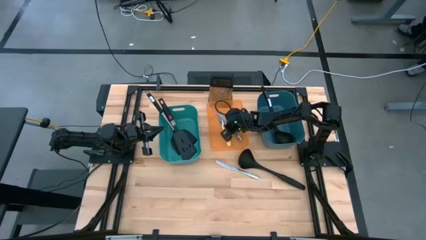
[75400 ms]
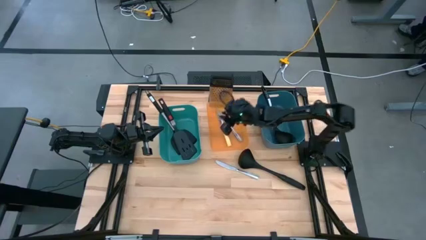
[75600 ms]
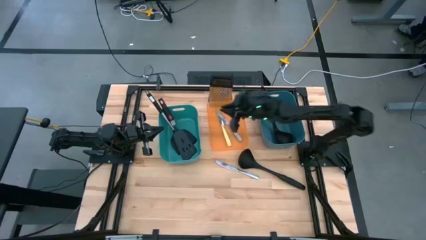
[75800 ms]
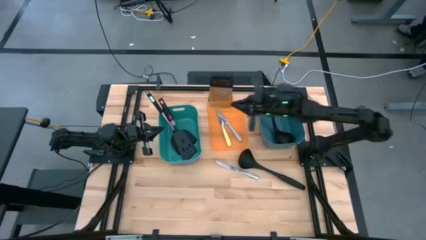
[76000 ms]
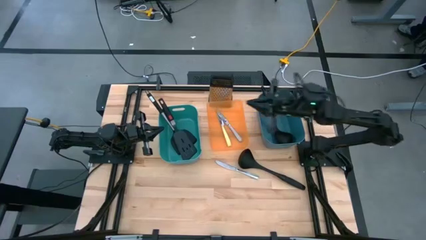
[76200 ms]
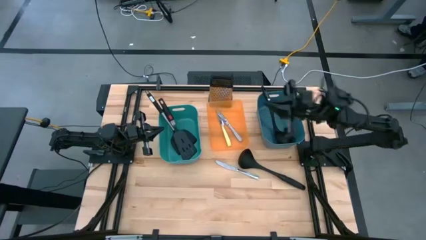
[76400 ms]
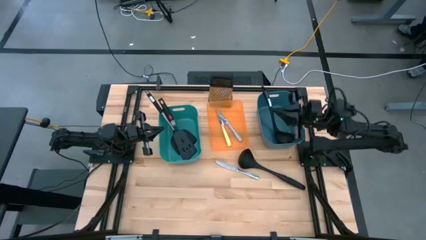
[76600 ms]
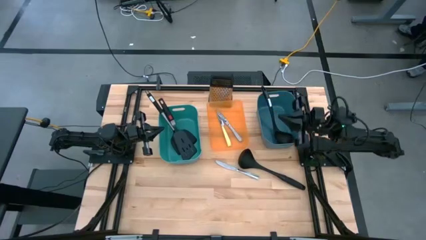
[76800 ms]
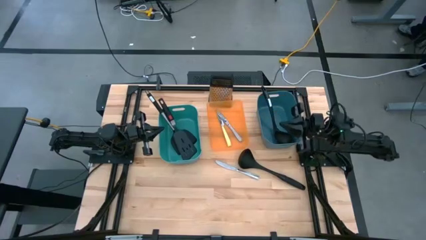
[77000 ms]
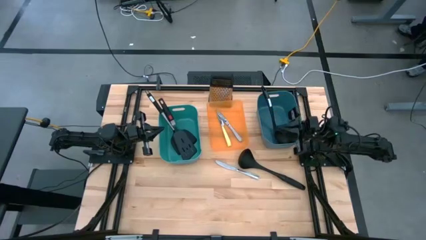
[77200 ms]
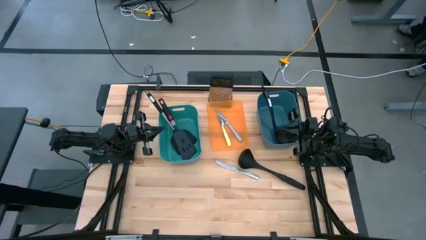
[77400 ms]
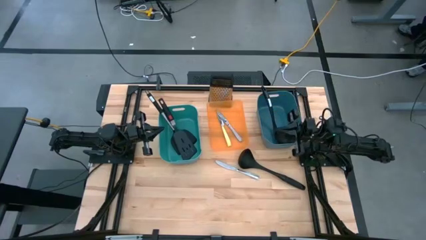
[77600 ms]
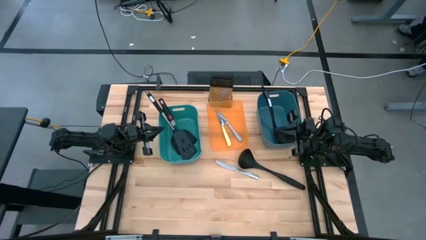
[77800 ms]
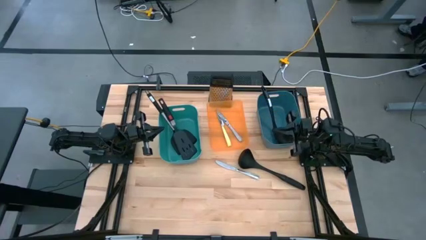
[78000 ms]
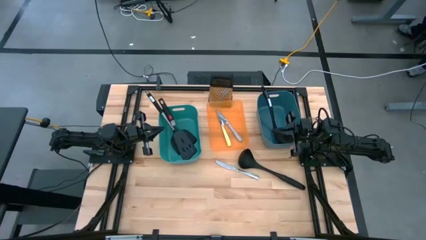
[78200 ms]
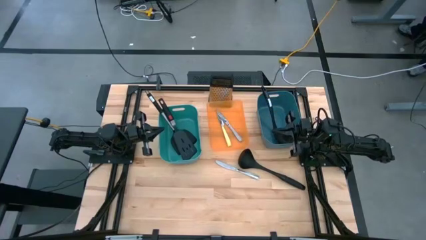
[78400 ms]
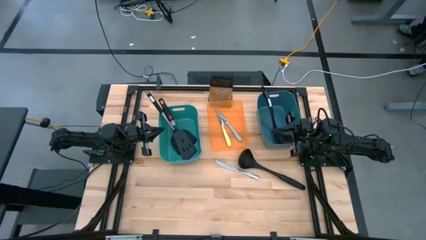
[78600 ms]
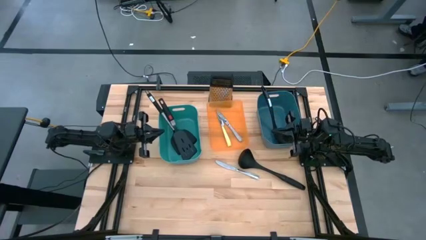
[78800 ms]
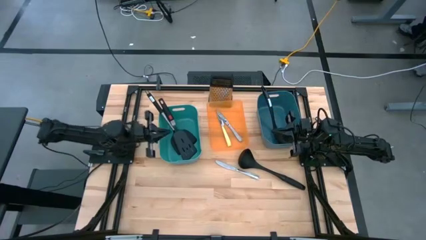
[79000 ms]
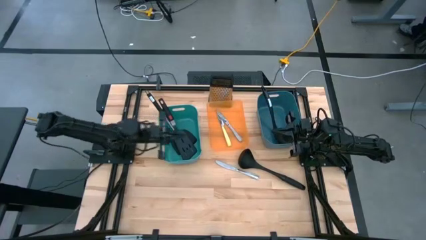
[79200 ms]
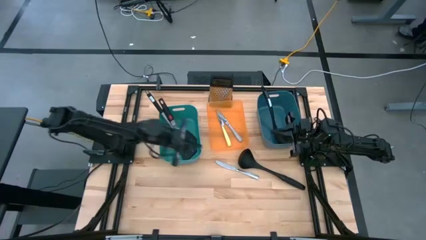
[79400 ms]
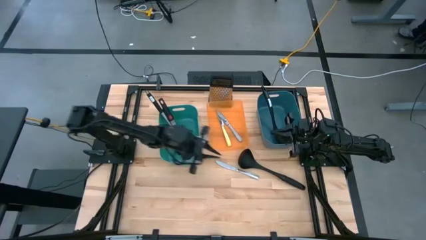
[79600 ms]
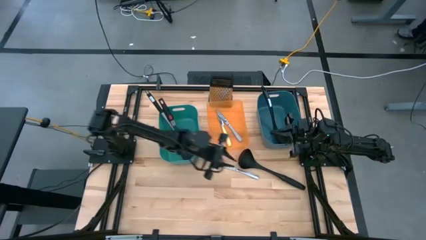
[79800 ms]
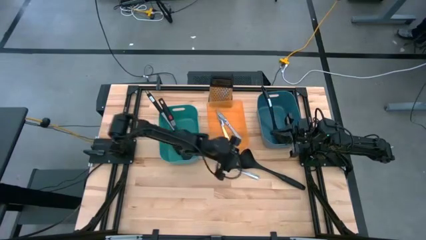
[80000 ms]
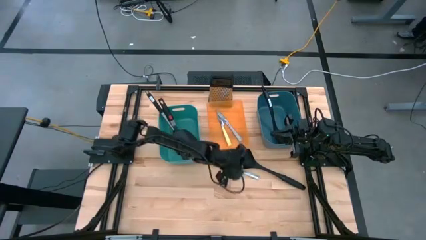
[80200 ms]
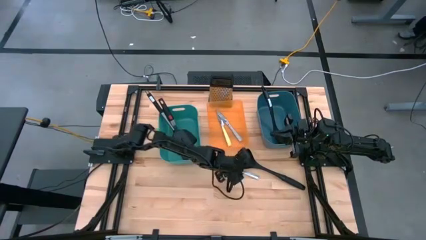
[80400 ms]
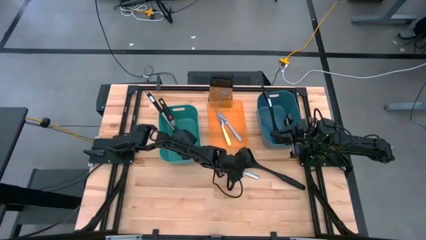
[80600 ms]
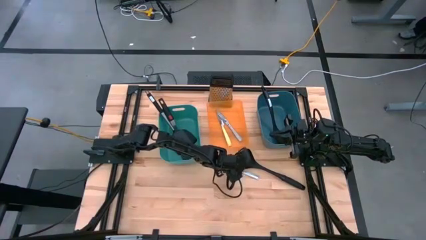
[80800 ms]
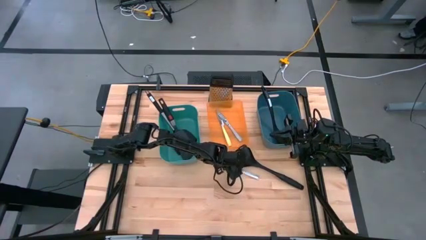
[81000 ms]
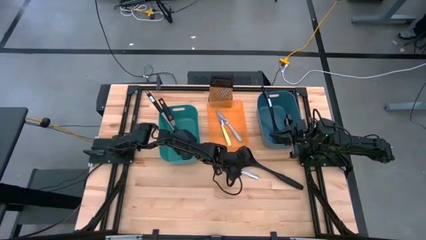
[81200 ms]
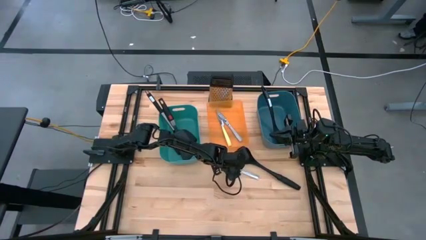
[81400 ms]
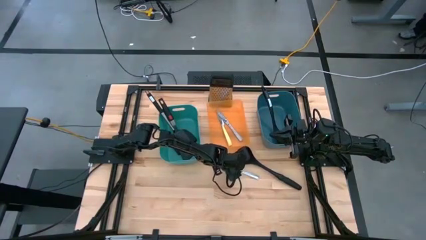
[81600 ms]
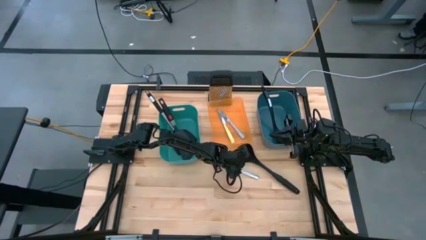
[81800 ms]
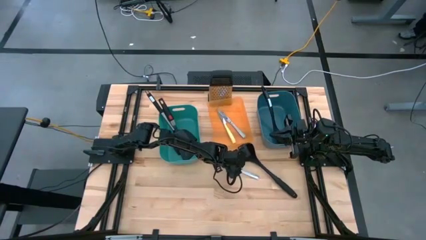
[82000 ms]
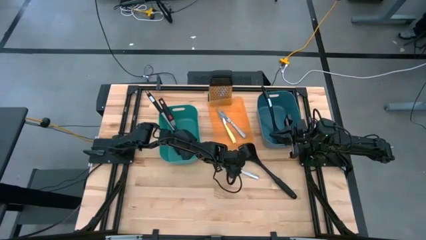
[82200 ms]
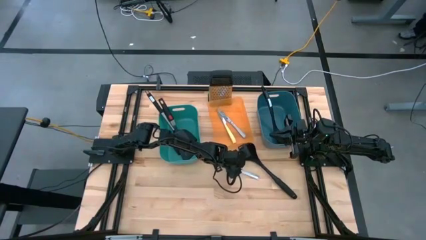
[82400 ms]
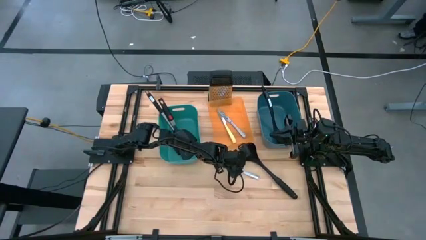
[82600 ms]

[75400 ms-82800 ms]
Task: Pick & Place Kitchen Items
Put the black serving spoon into the blue bin

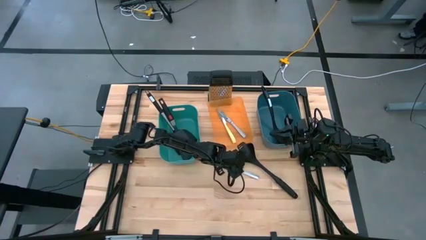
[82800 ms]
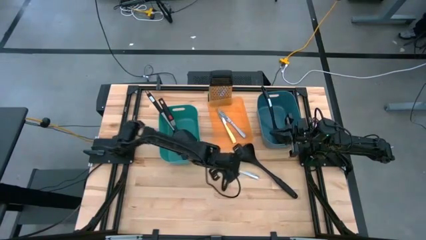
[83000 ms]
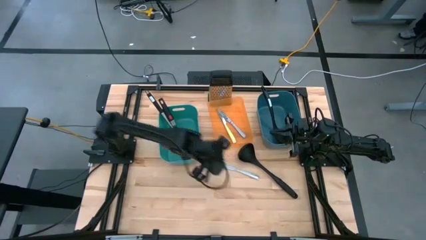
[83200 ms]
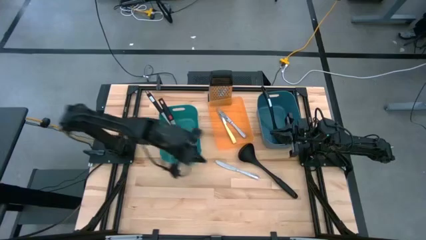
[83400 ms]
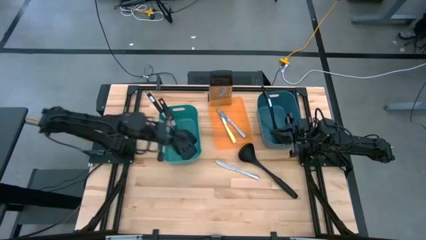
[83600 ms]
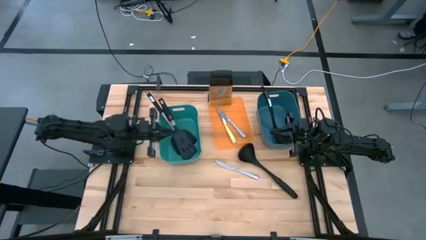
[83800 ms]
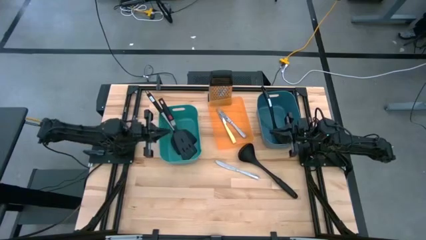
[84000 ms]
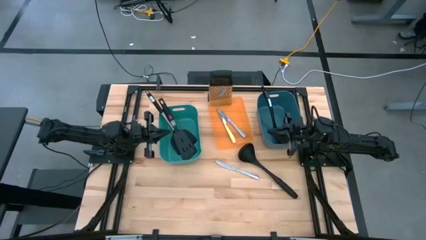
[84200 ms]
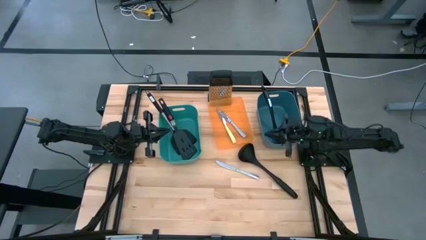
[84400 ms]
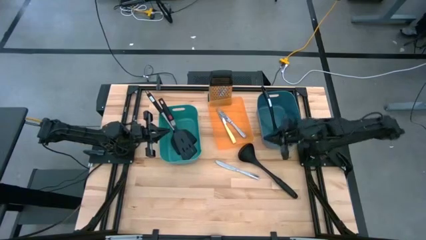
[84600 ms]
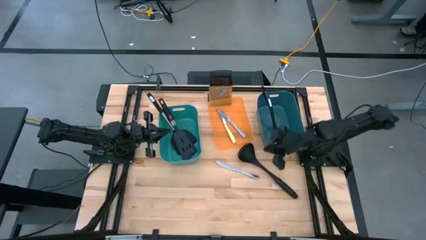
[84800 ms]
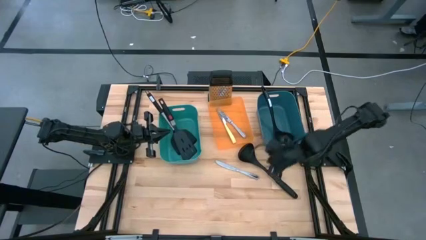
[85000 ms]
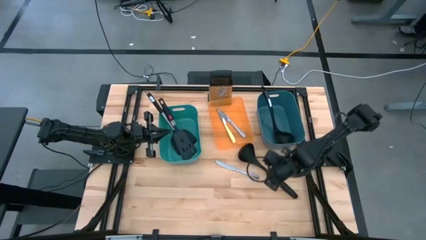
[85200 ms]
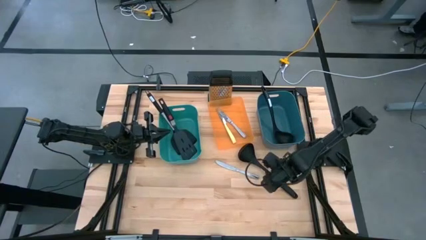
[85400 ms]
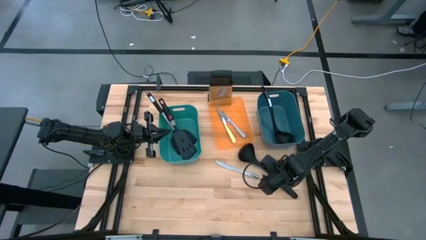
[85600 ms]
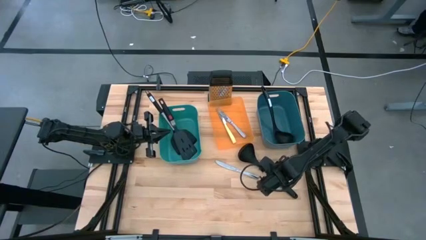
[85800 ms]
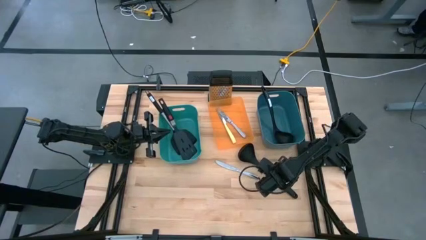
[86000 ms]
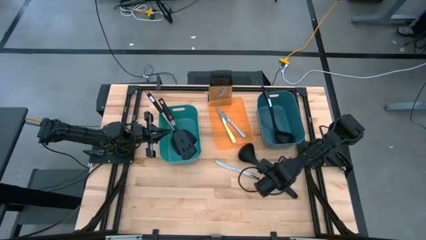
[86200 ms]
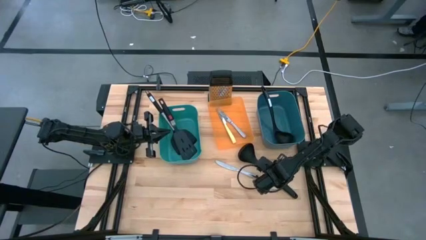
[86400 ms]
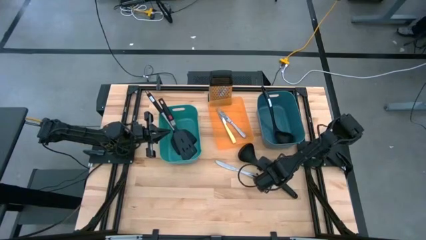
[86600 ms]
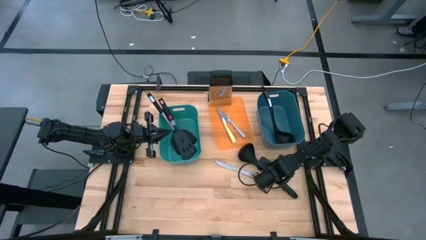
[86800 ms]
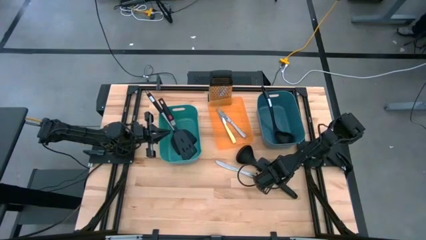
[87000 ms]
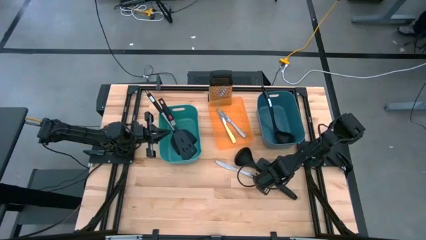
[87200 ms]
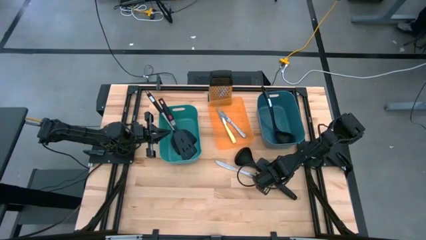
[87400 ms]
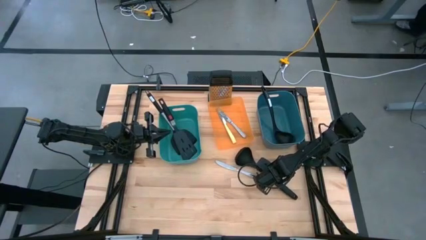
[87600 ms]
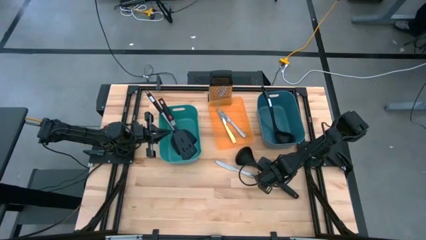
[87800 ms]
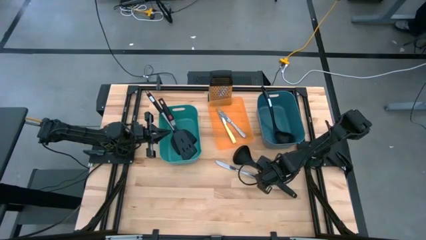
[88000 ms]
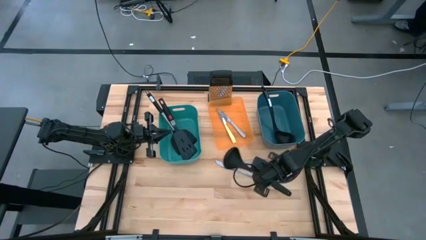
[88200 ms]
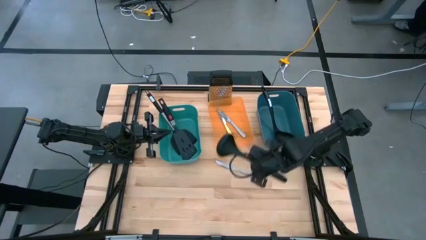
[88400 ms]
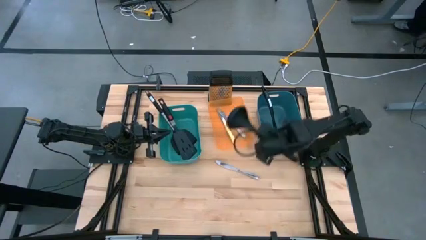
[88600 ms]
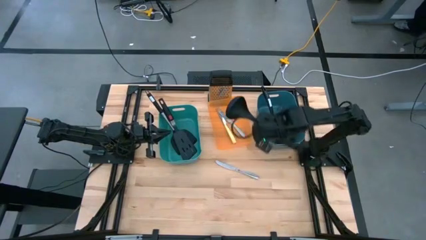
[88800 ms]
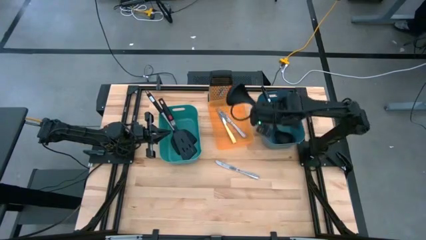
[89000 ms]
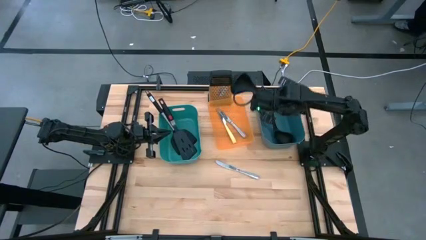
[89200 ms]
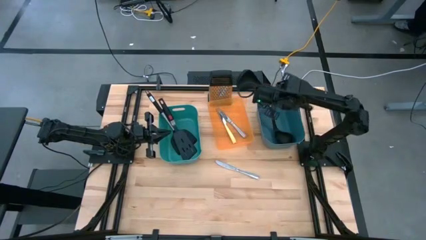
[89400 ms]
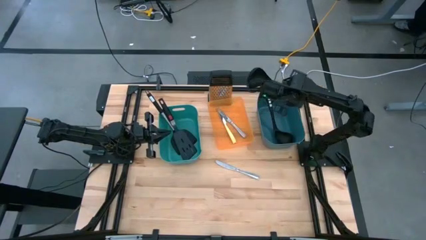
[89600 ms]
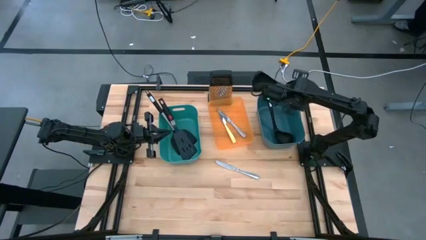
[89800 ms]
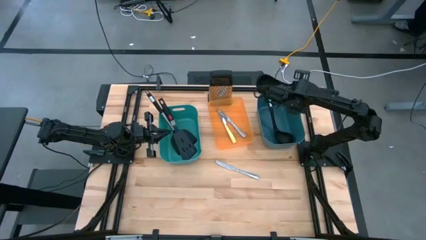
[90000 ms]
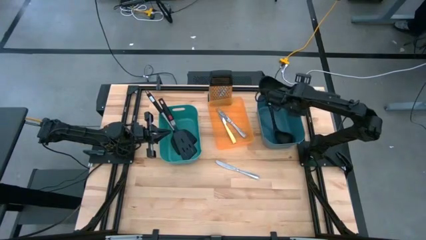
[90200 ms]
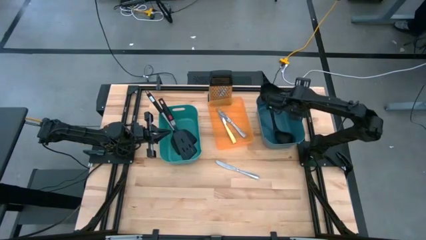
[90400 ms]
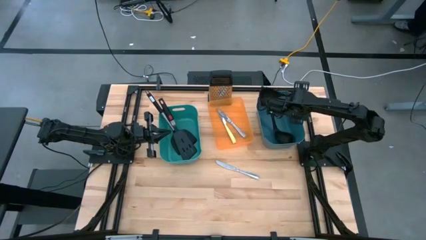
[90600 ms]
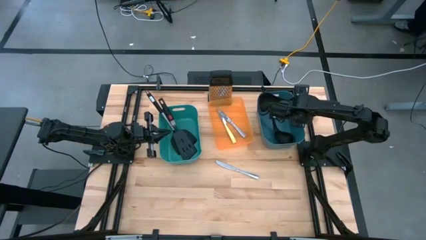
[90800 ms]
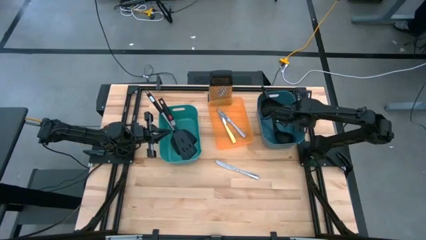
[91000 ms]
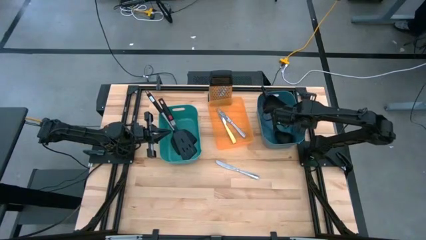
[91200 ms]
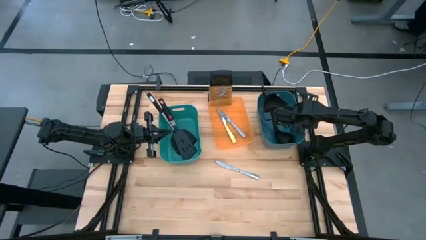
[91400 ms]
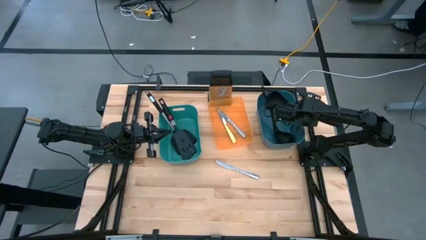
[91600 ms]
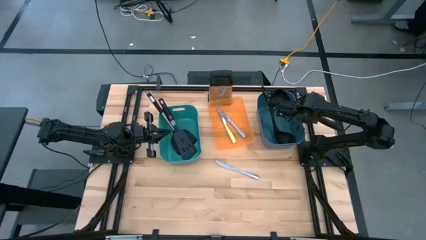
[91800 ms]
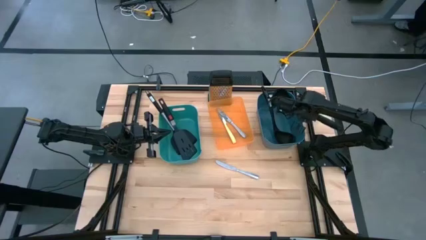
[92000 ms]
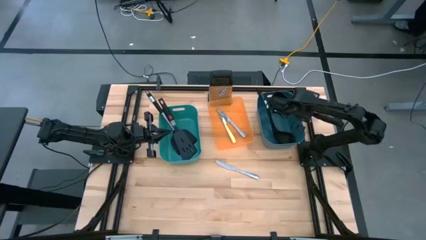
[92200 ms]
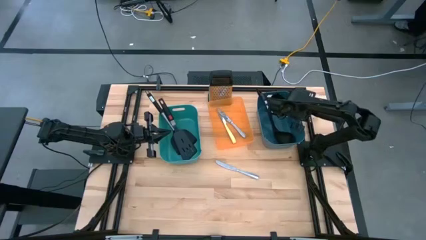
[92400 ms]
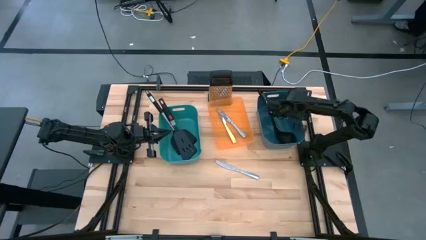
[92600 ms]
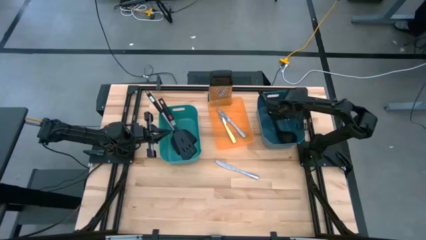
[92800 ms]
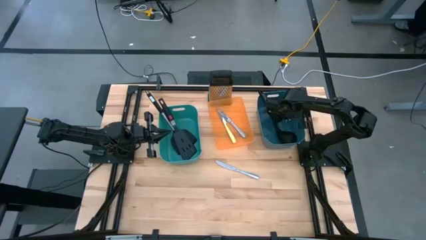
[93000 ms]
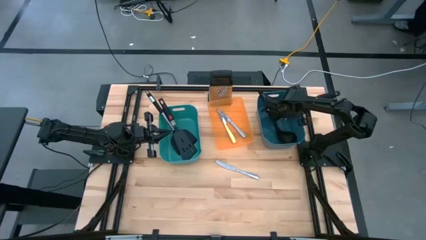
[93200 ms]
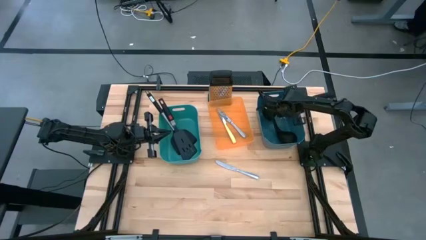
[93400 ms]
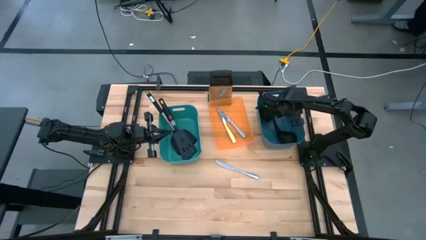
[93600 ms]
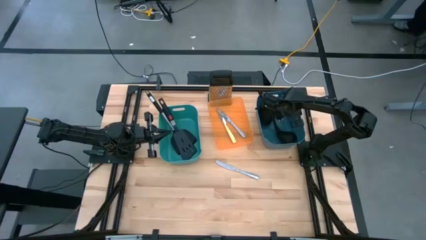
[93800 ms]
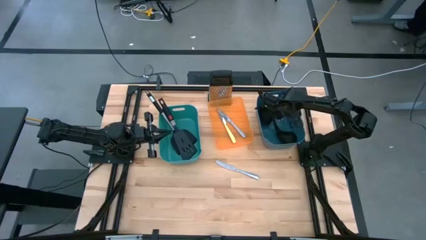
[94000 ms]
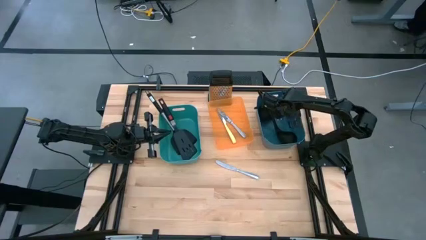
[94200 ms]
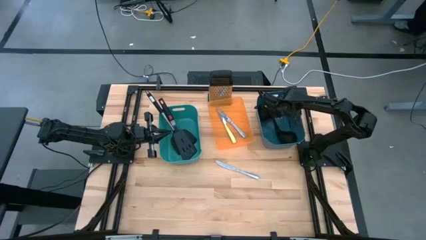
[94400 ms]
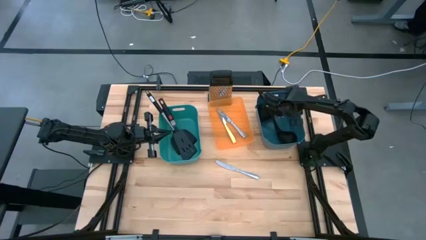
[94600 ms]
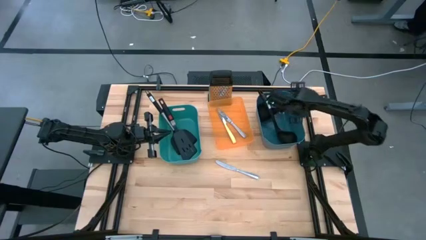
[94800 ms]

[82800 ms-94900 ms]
Put the black serving spoon into the blue bin
